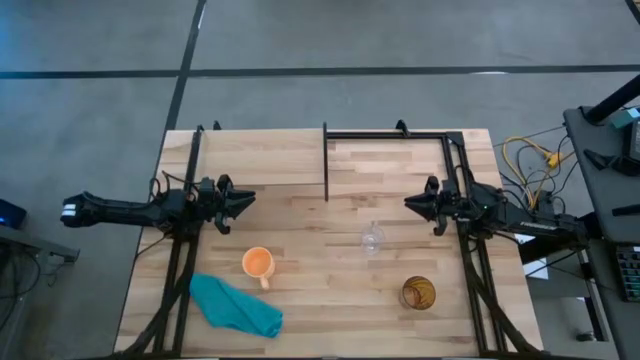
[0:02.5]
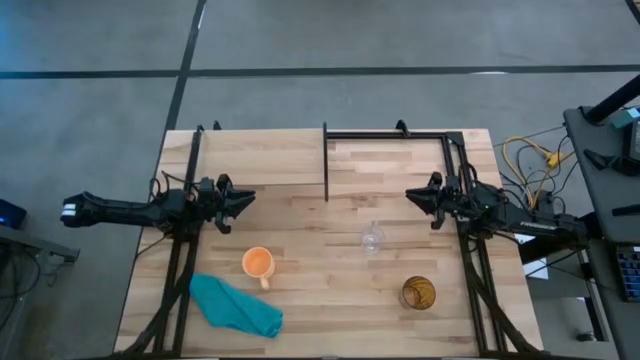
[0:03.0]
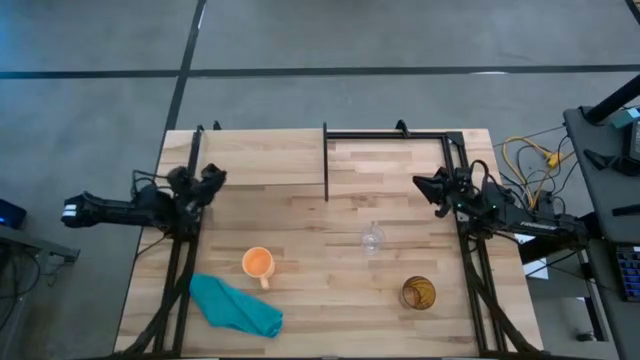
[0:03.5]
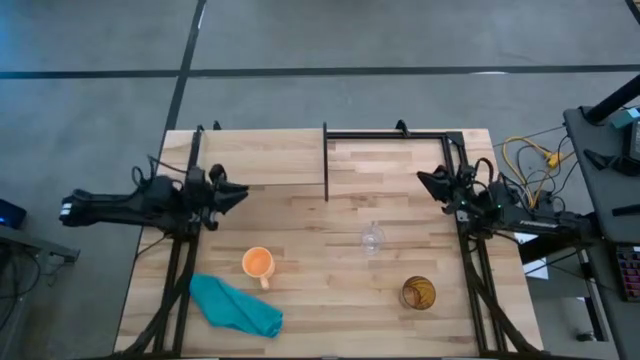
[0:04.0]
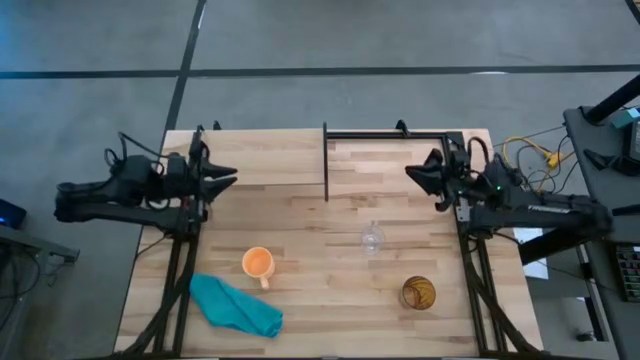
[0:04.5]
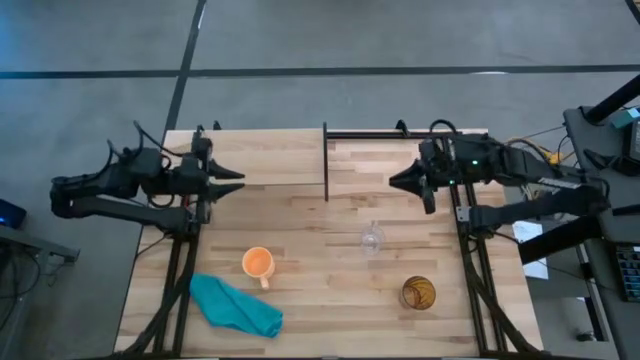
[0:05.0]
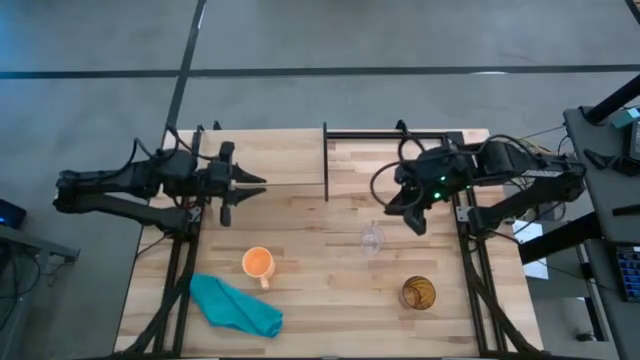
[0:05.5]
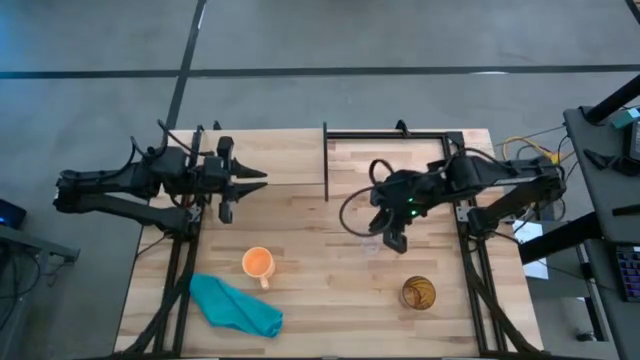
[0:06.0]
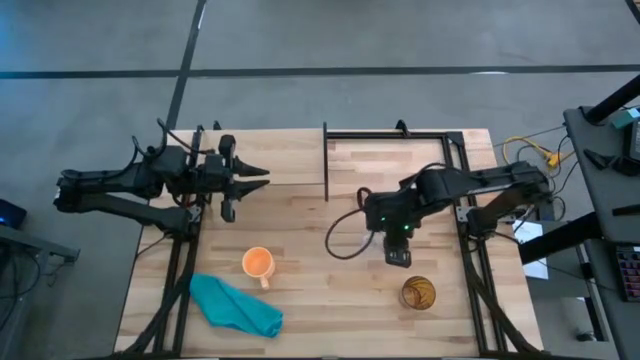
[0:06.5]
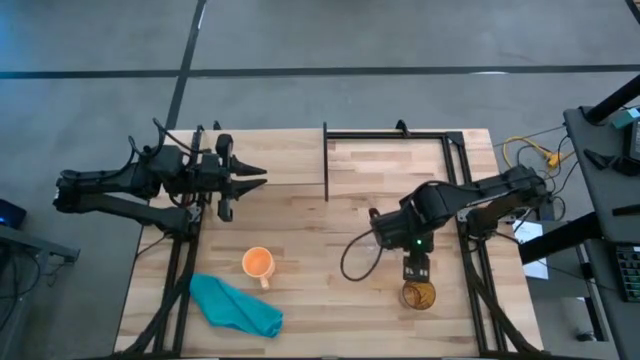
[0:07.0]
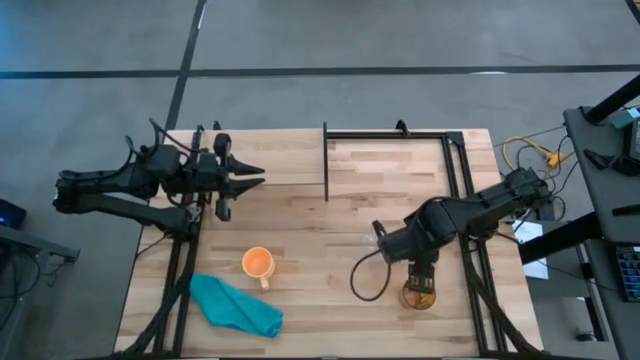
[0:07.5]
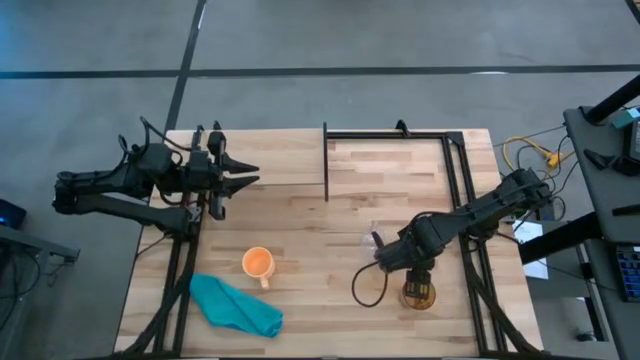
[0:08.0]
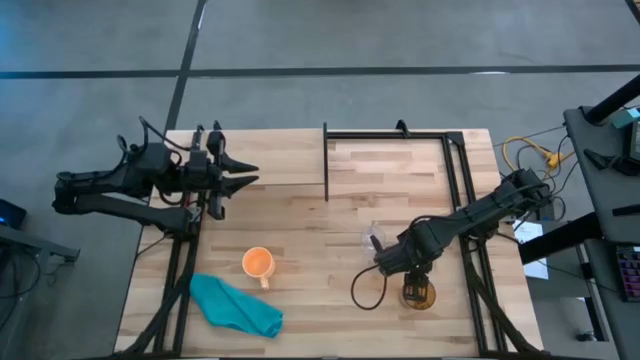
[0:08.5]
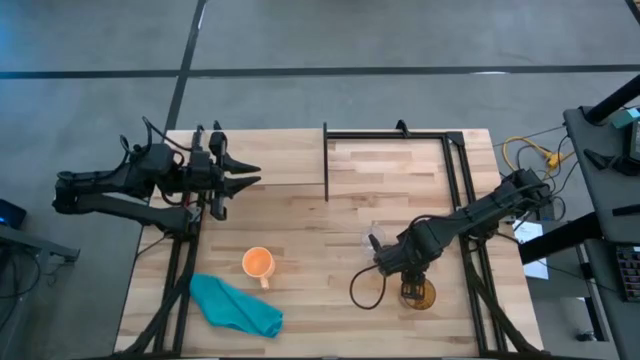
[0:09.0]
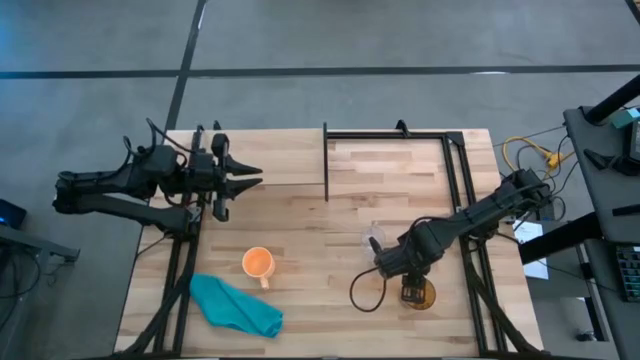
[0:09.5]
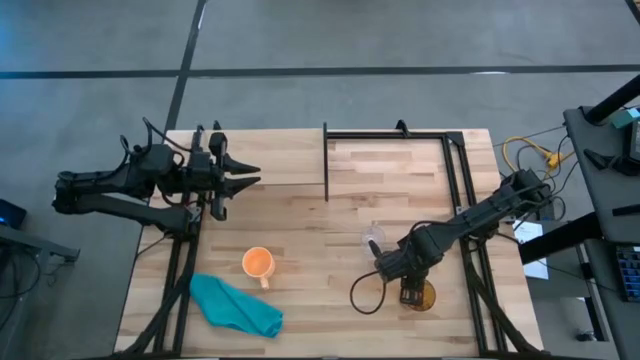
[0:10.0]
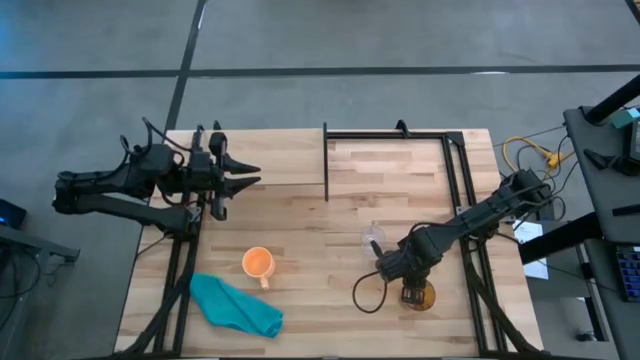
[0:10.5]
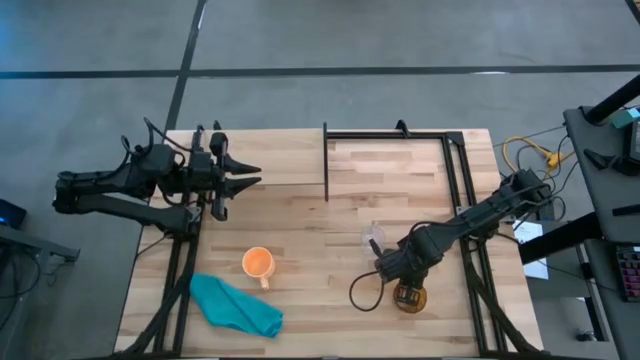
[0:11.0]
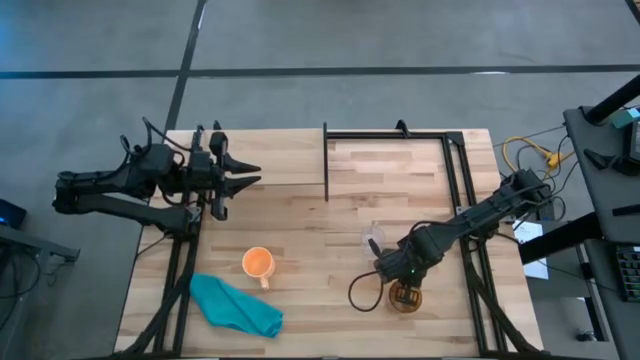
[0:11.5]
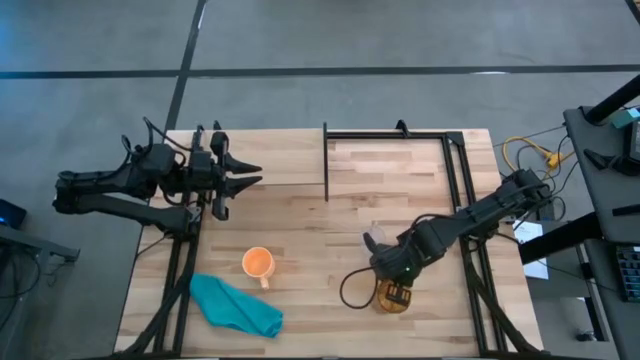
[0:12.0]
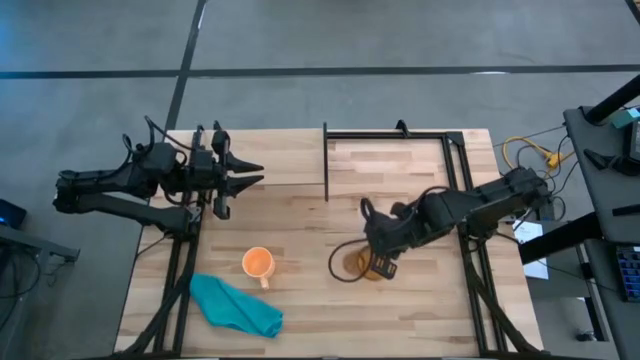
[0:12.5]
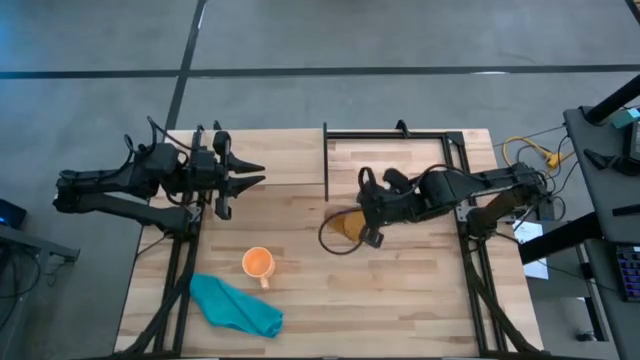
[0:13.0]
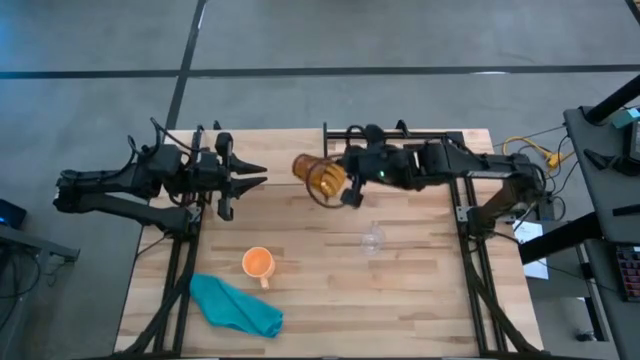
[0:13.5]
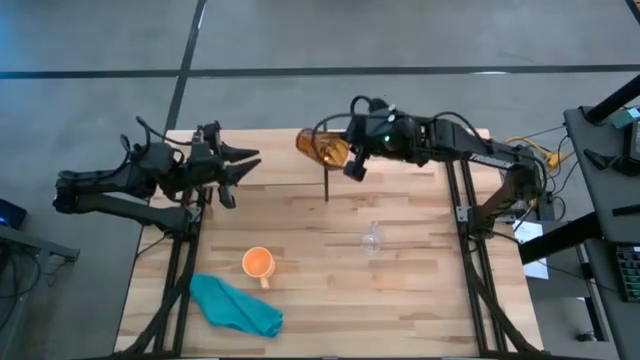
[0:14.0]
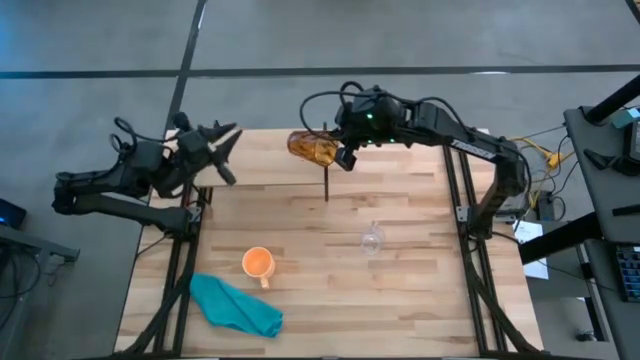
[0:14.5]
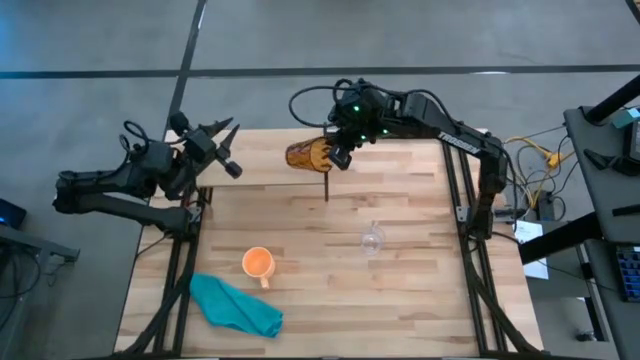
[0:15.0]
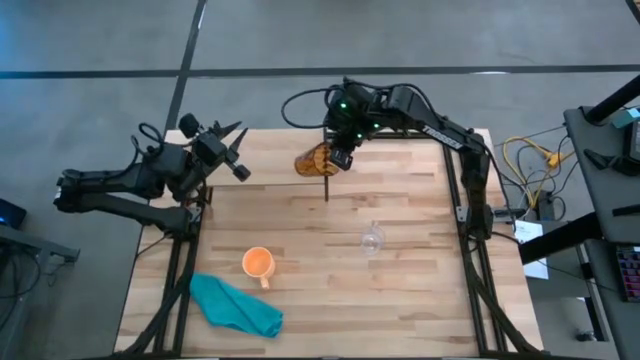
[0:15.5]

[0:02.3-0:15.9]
Task: Stack small to large cups/mugs on shelf
Put the brown glass on the shelf

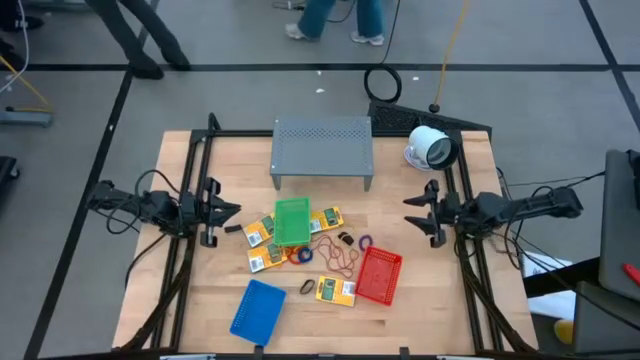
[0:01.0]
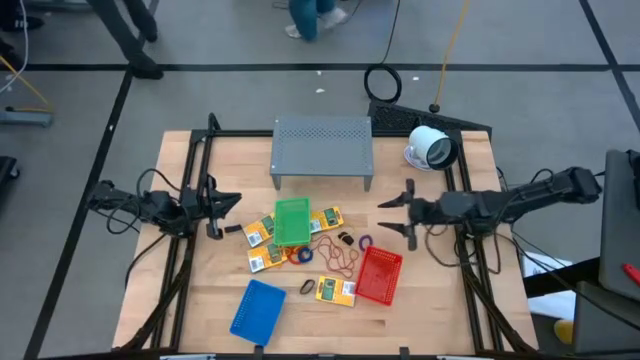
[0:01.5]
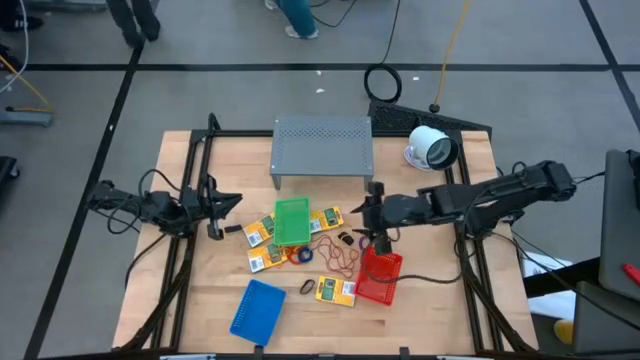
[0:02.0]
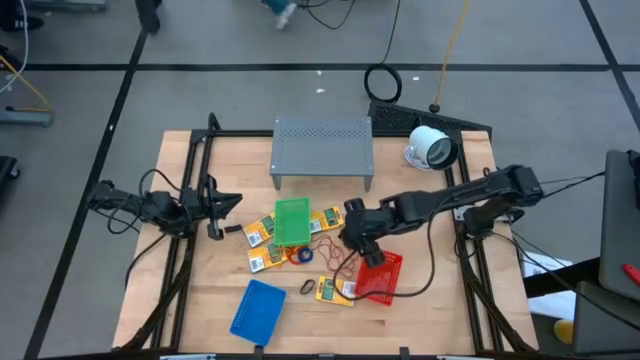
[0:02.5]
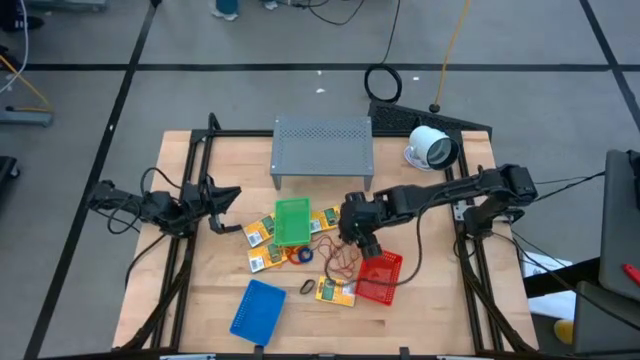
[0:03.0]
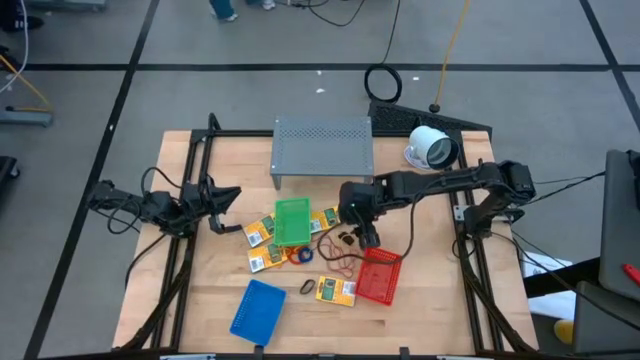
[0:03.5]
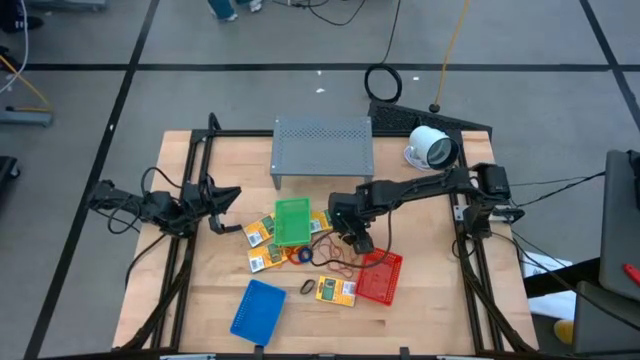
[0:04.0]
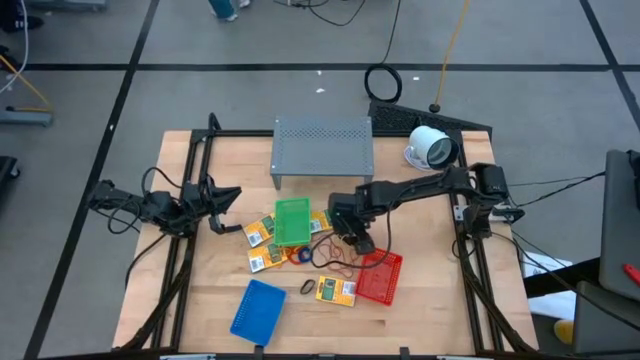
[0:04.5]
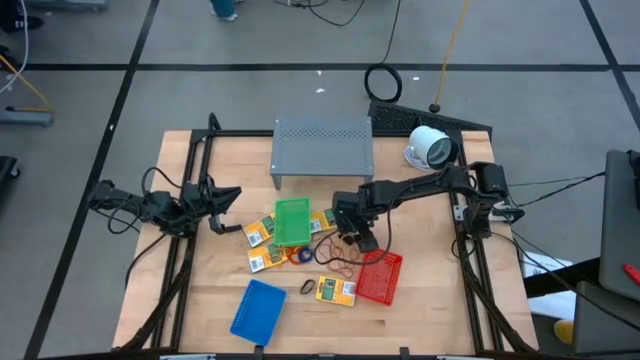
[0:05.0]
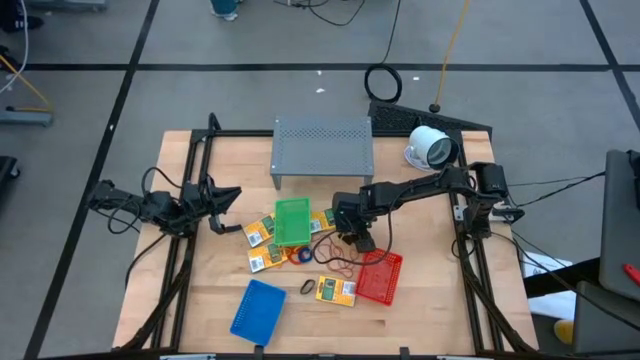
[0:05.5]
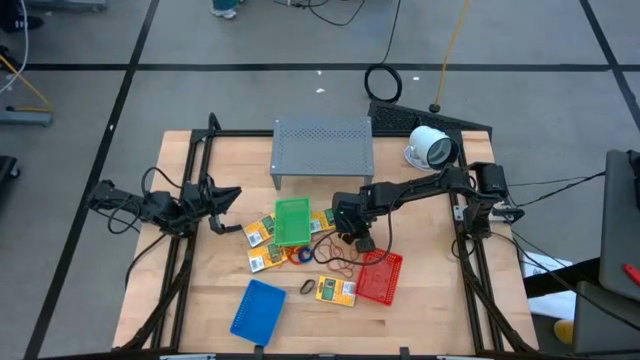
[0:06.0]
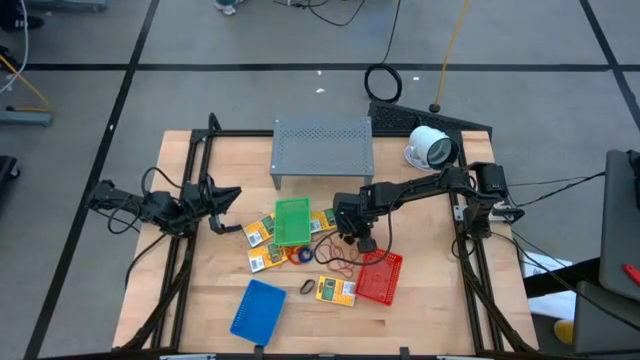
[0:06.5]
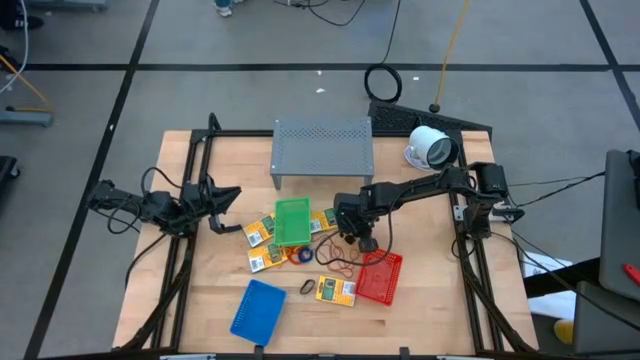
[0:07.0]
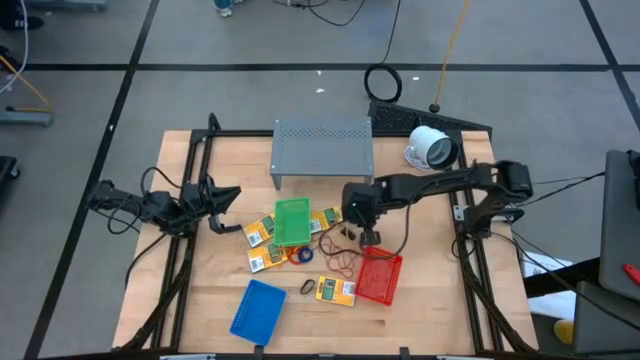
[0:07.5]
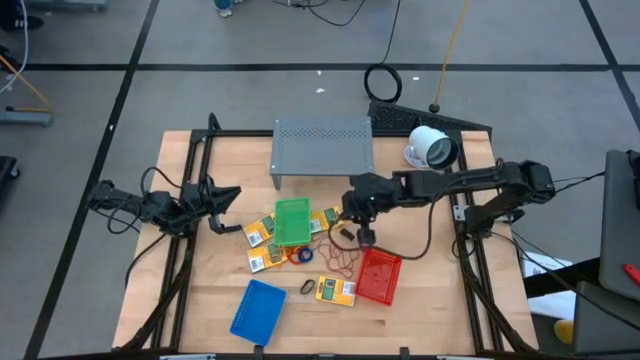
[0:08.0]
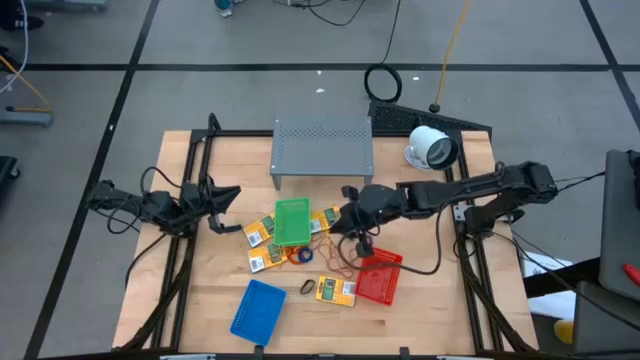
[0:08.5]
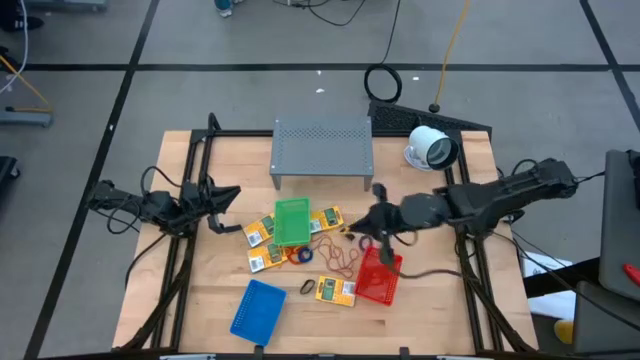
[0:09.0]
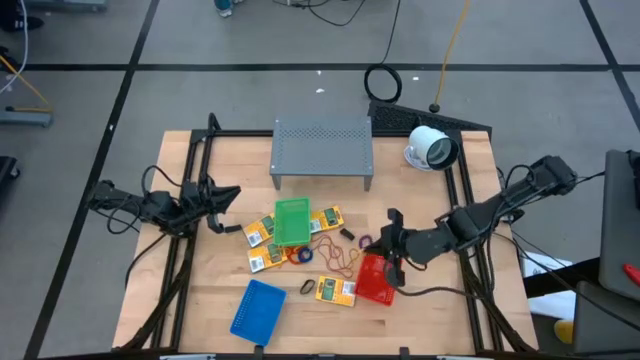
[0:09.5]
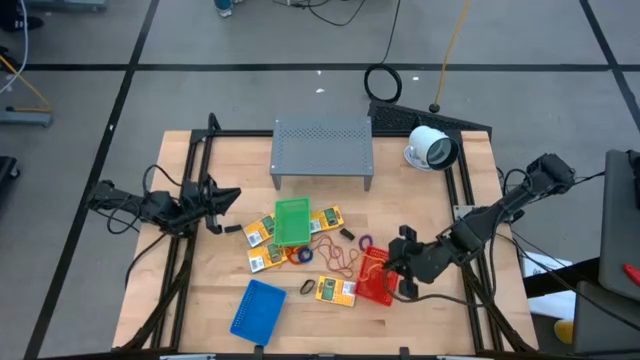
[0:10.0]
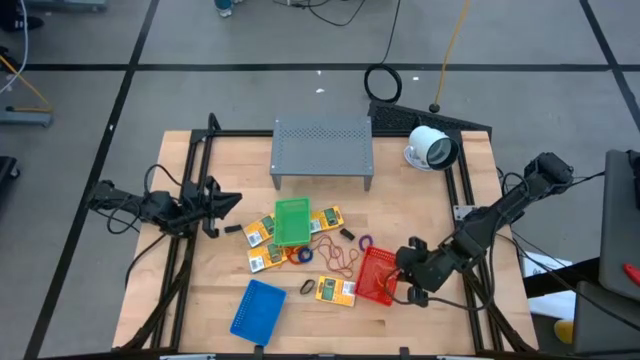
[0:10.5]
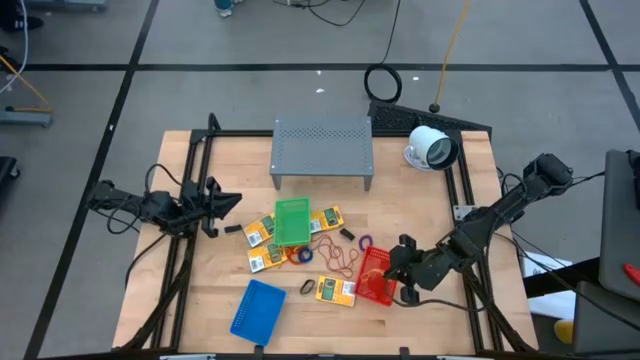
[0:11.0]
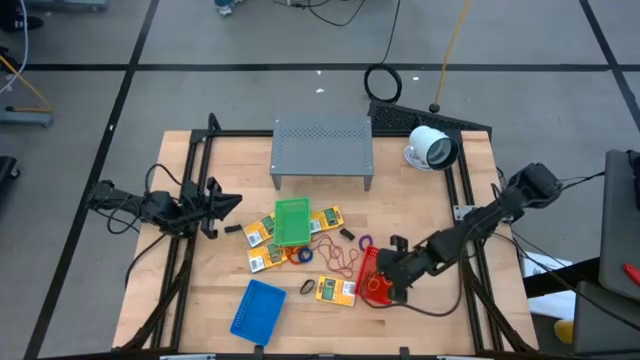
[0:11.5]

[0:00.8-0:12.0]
Task: Pick & Place Office Desk Supplies
Put the yellow rubber band into the red bin
